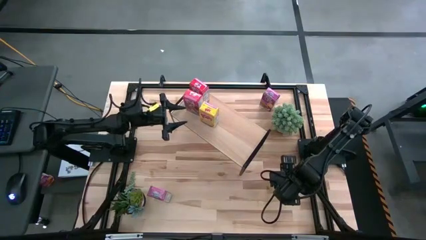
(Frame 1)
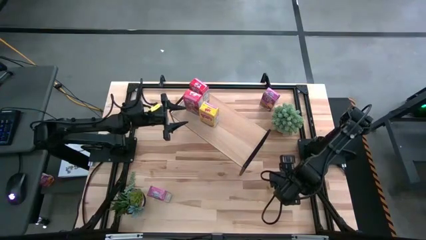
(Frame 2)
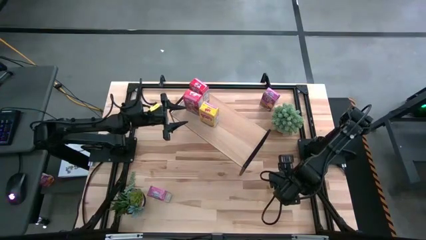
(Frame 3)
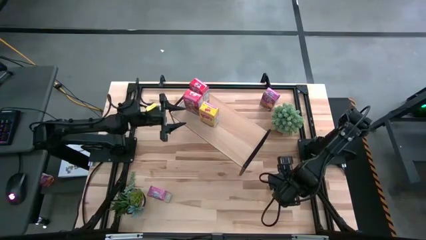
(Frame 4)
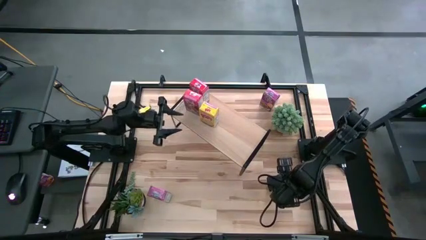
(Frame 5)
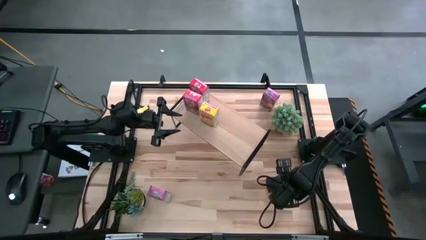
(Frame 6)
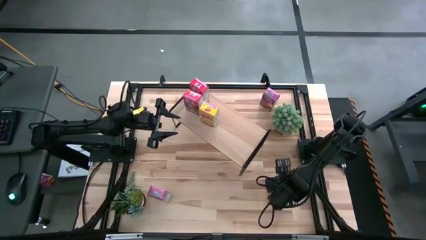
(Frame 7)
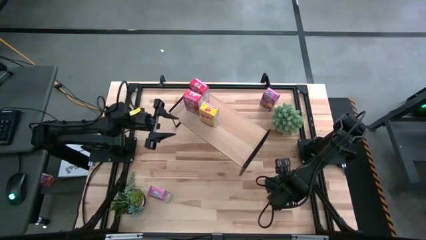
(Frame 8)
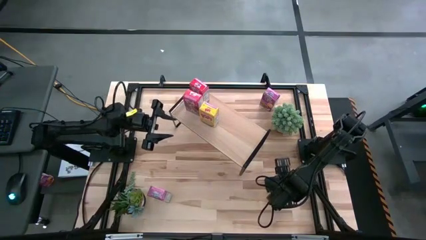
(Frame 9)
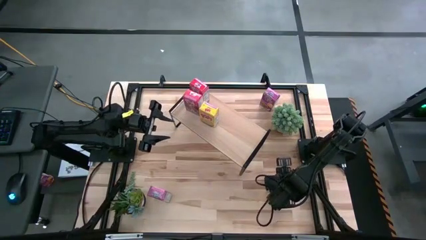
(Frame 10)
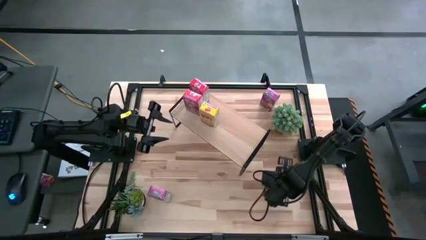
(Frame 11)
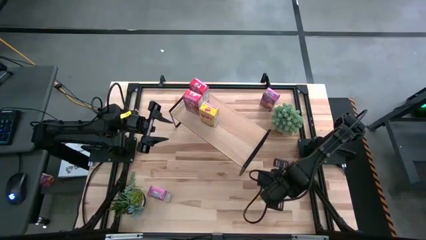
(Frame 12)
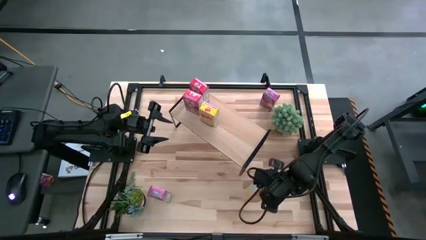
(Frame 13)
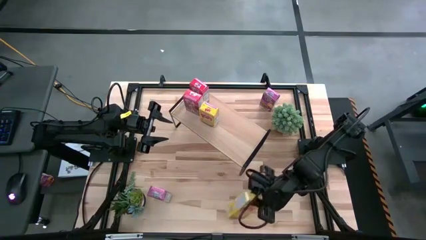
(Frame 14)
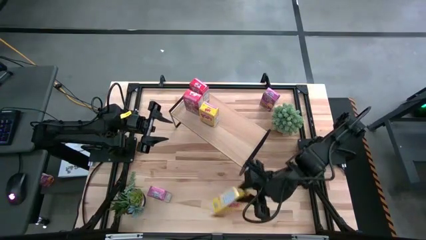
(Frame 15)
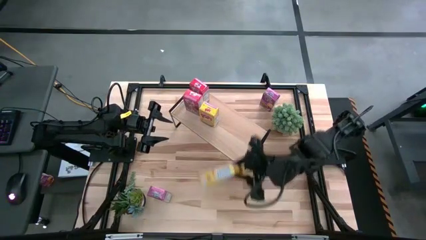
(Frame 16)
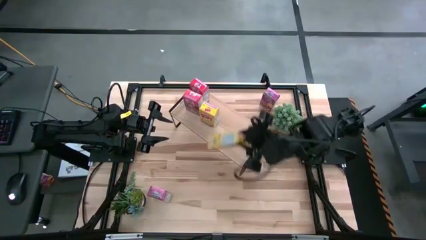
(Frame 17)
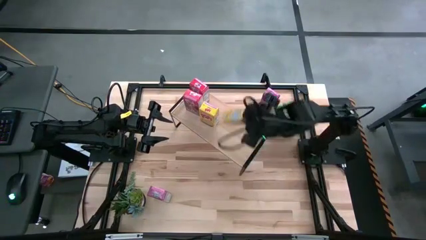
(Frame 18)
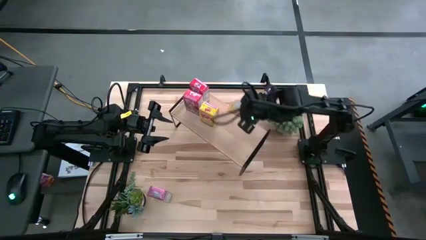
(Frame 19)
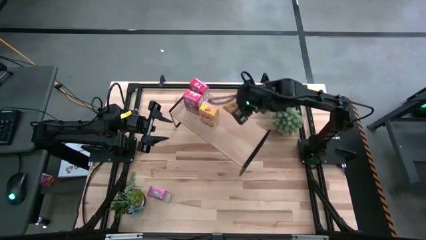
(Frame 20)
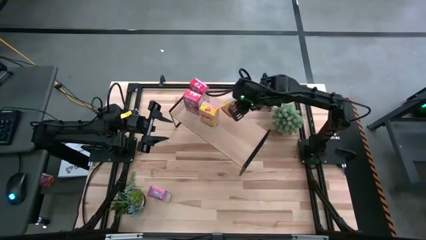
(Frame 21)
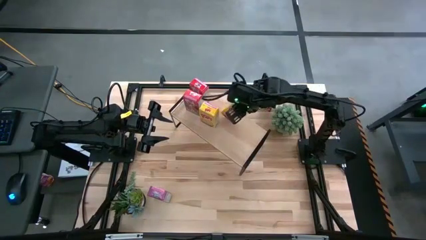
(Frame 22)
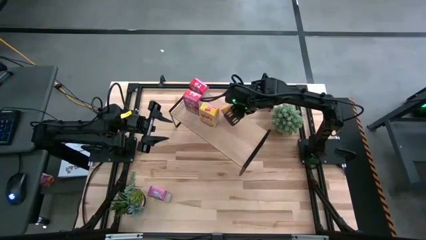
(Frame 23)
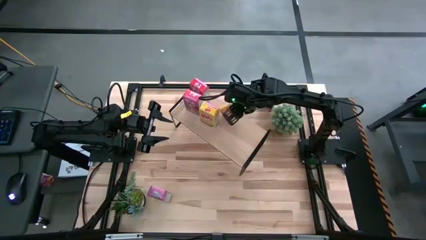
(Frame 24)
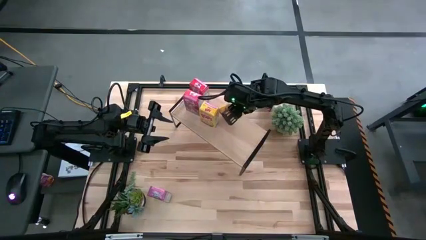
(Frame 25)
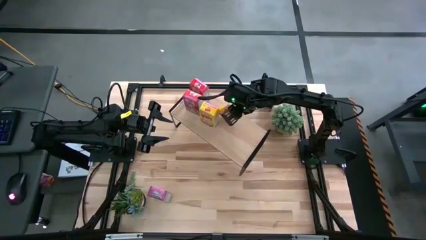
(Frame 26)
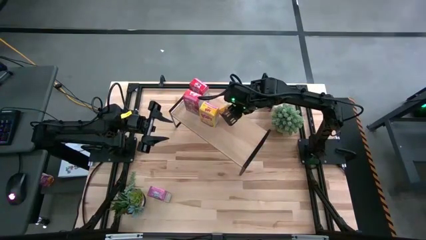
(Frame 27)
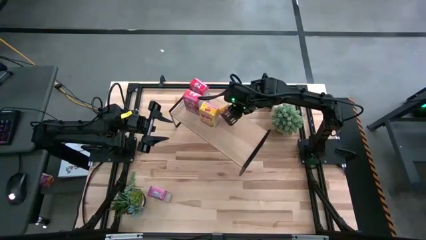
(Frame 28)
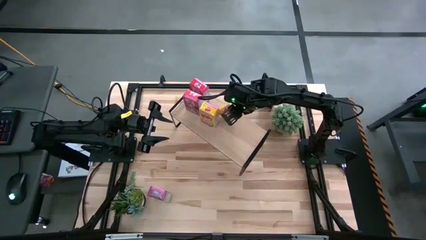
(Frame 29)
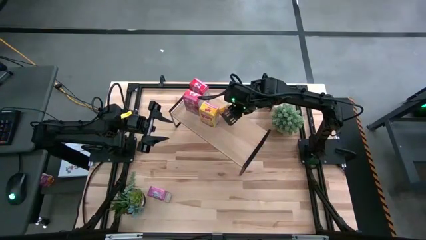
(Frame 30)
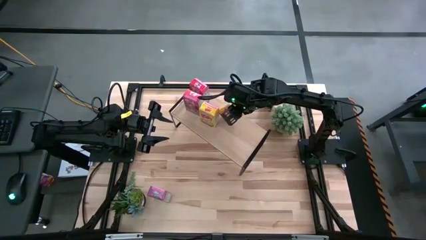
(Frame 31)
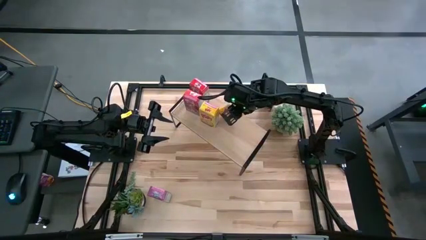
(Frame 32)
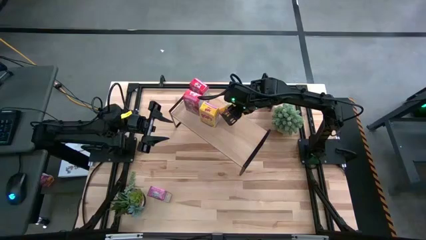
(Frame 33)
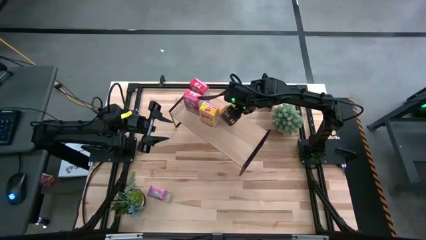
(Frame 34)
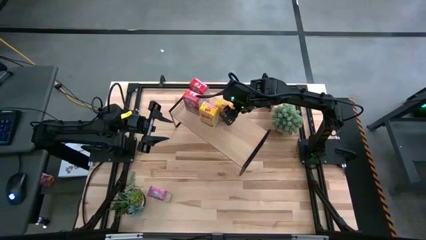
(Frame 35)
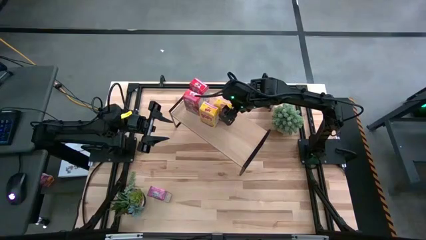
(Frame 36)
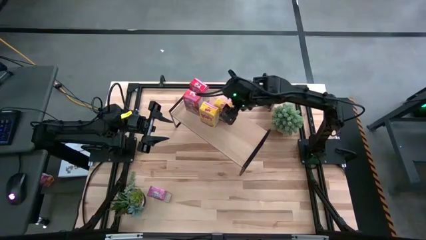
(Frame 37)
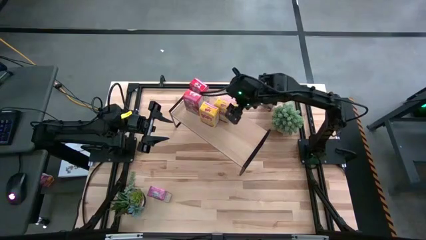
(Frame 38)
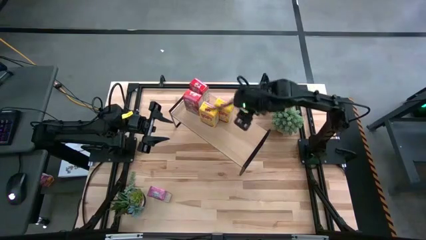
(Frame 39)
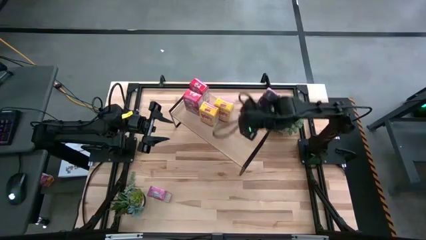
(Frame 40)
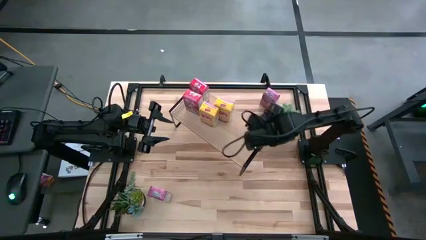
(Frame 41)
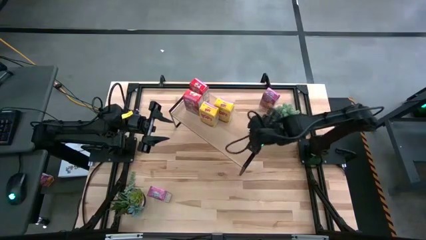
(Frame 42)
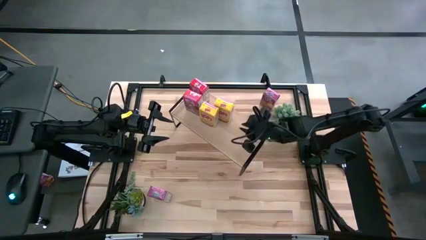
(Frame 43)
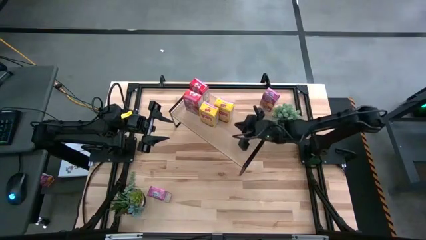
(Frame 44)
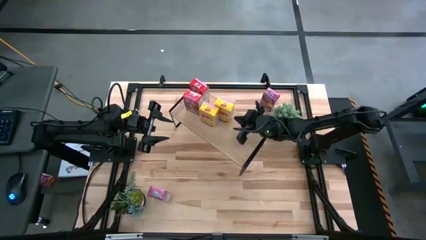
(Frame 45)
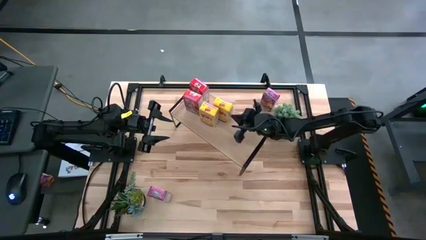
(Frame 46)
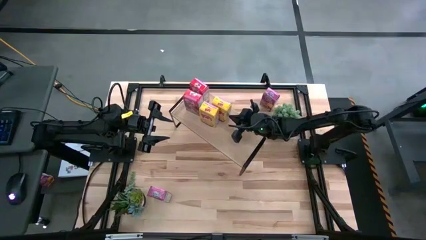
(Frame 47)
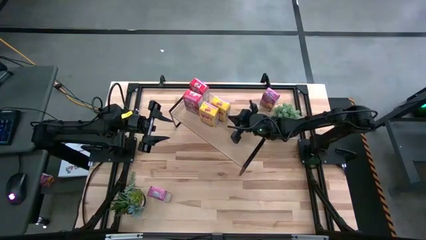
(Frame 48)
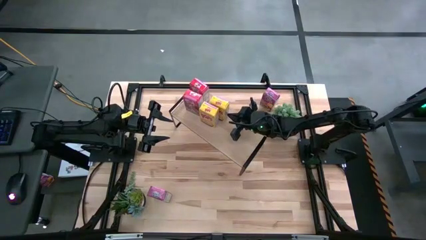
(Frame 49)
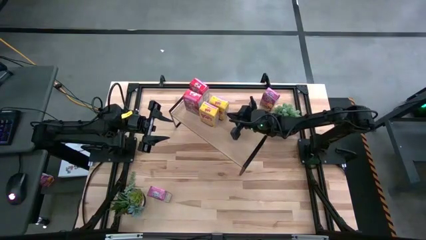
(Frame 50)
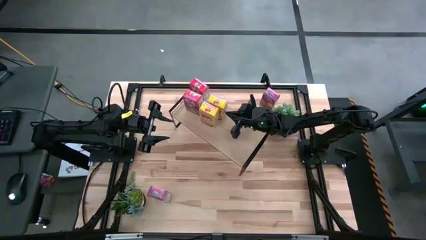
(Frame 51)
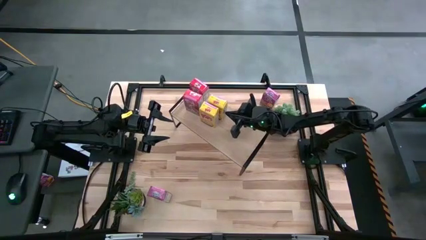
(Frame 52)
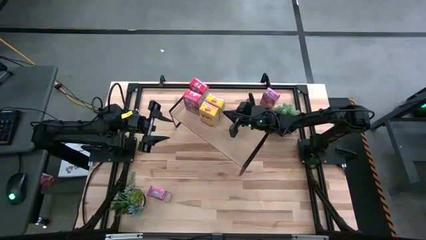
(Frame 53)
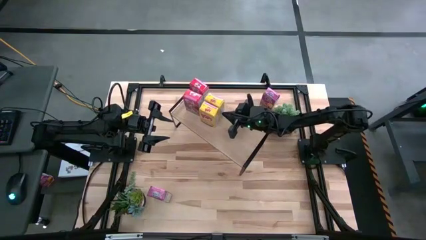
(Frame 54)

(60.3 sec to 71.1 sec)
Task: Stack cereal on shelf
Put the yellow cereal box on the shelf
